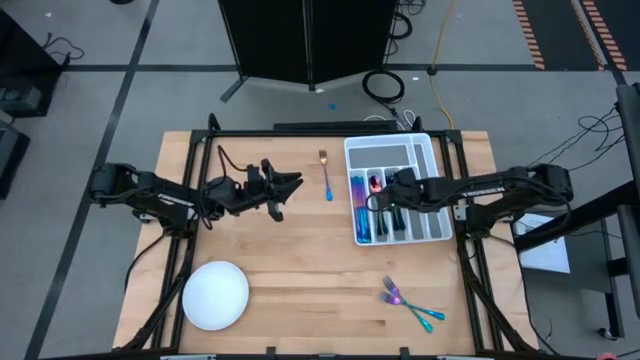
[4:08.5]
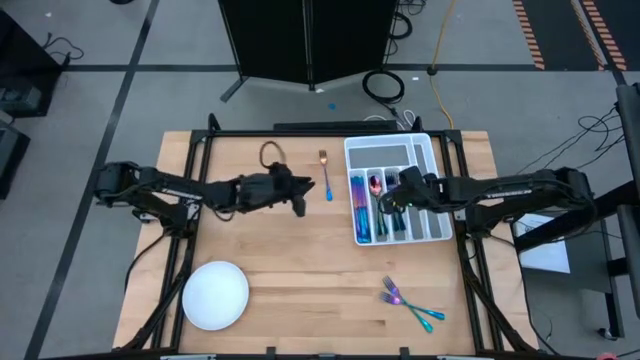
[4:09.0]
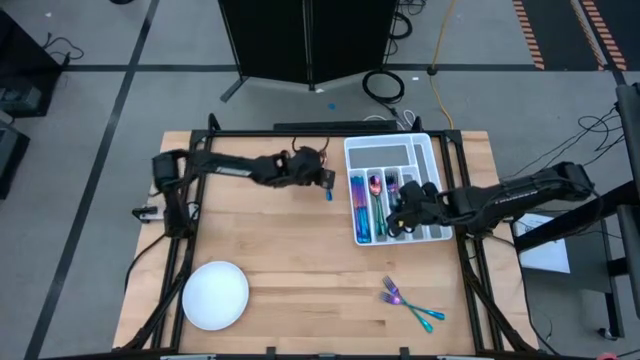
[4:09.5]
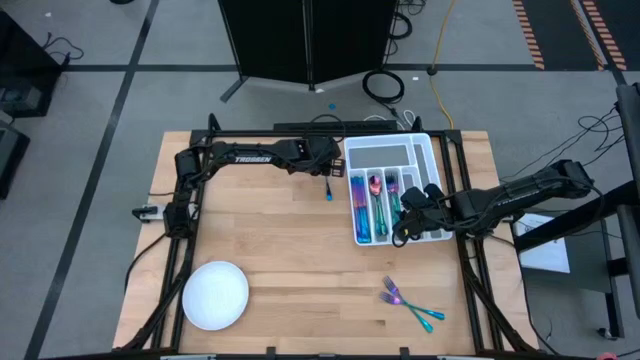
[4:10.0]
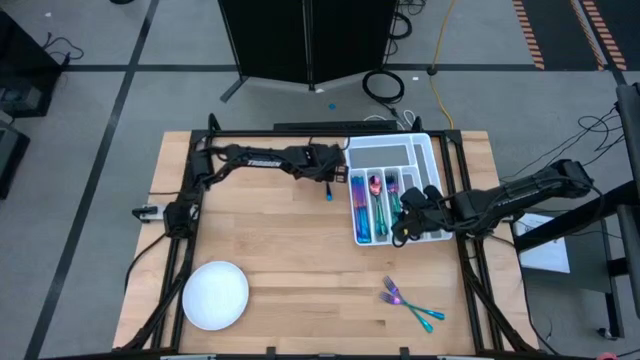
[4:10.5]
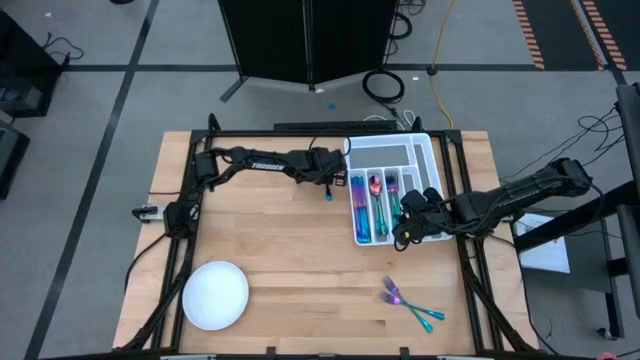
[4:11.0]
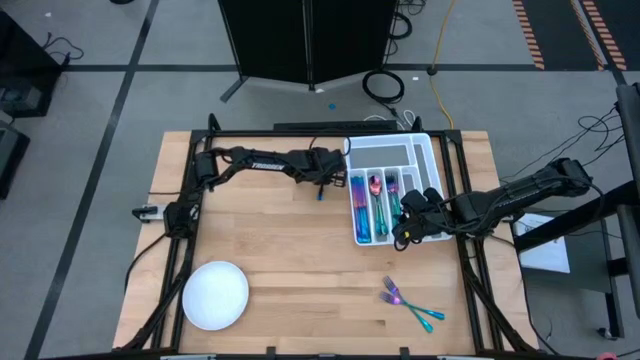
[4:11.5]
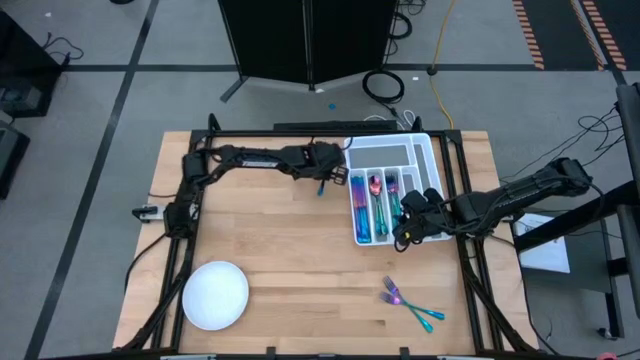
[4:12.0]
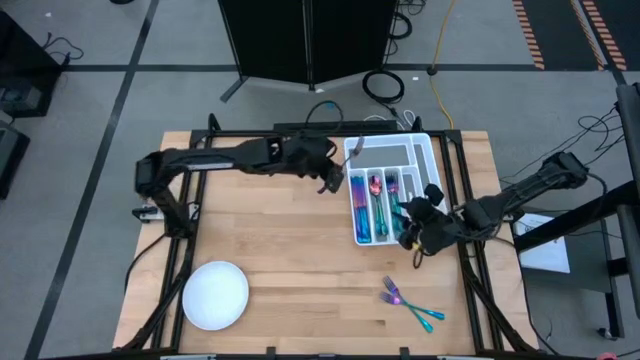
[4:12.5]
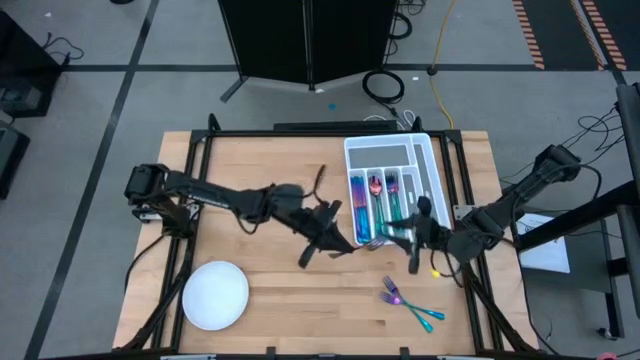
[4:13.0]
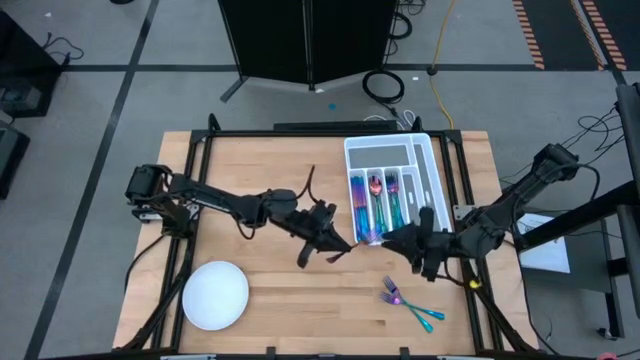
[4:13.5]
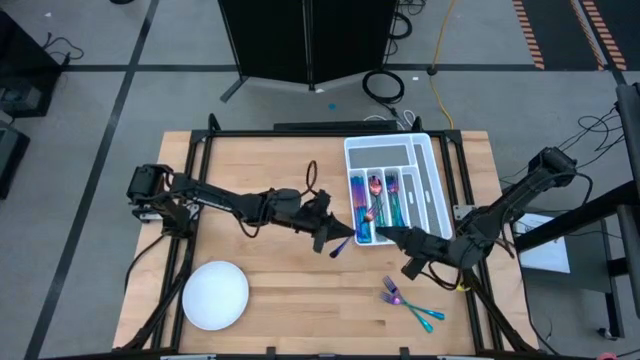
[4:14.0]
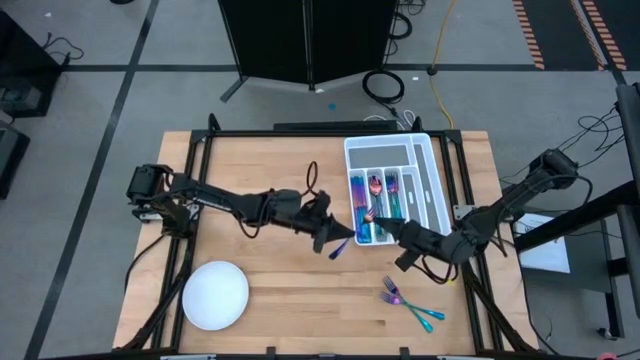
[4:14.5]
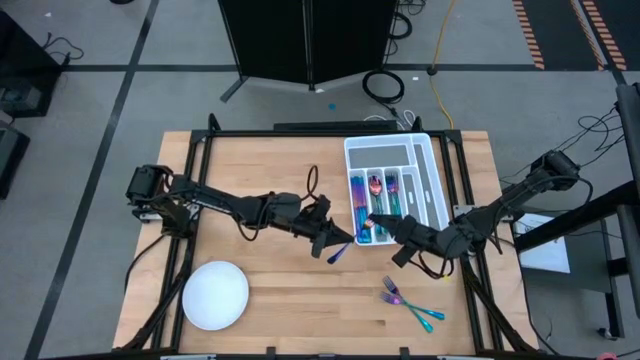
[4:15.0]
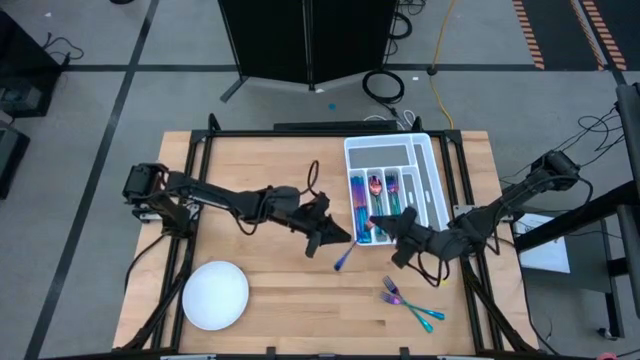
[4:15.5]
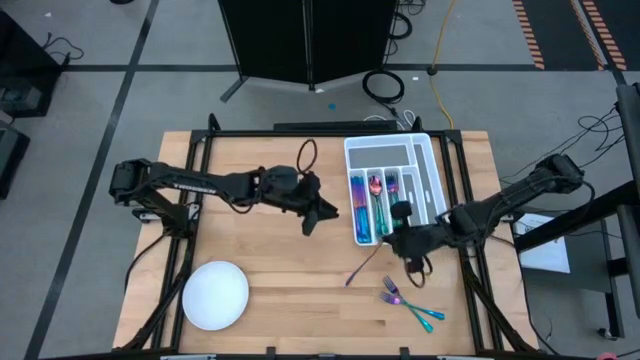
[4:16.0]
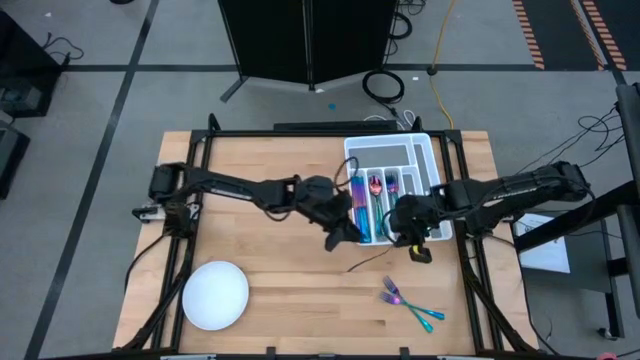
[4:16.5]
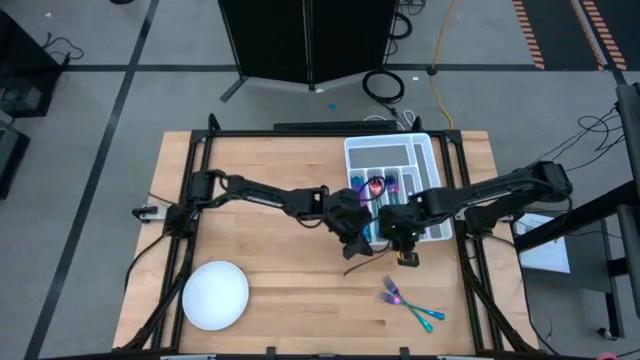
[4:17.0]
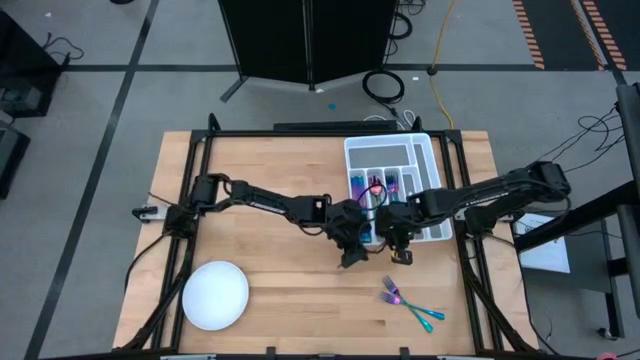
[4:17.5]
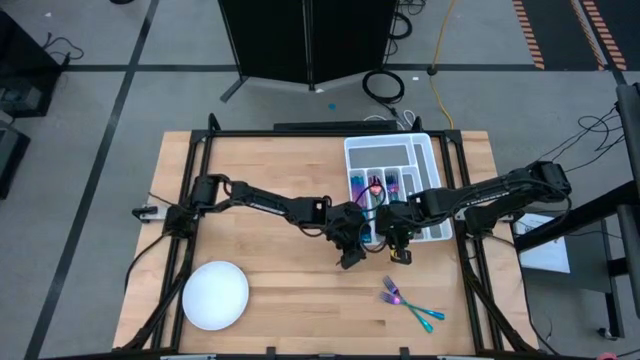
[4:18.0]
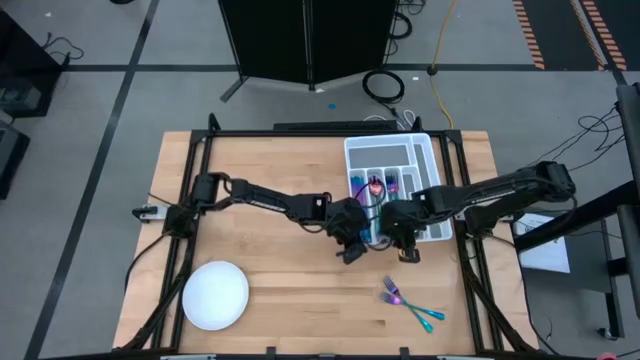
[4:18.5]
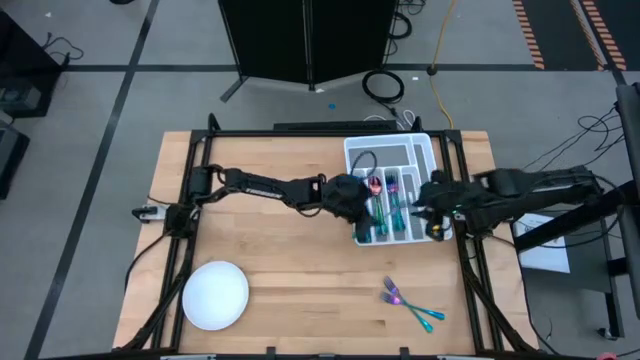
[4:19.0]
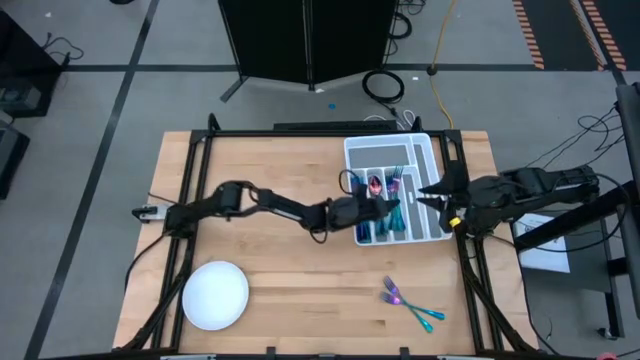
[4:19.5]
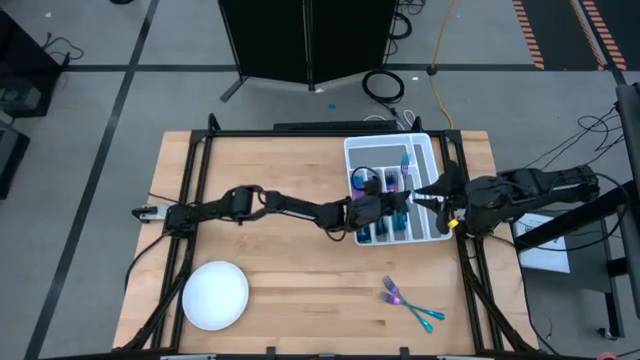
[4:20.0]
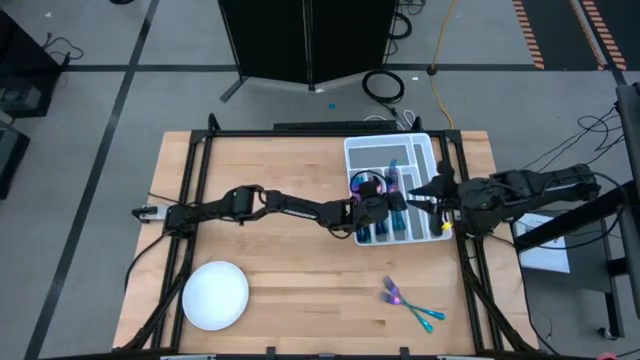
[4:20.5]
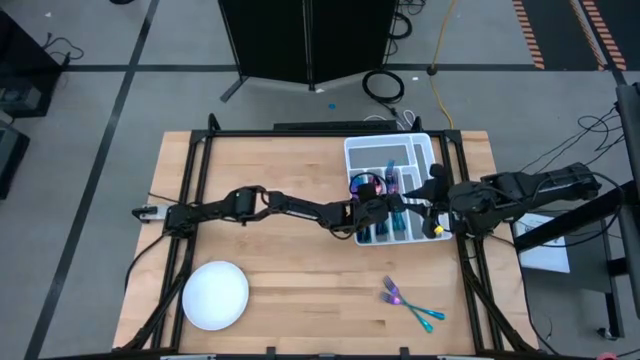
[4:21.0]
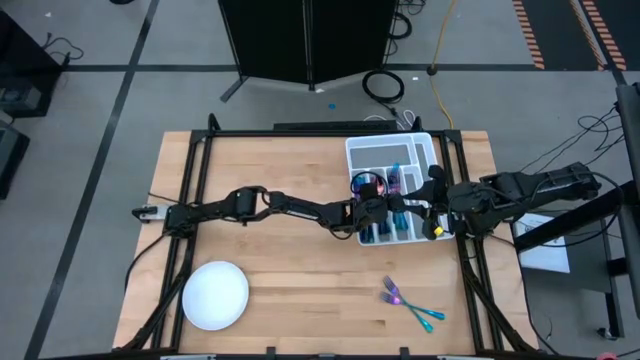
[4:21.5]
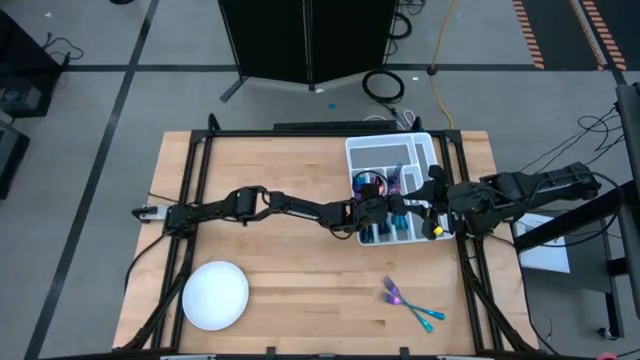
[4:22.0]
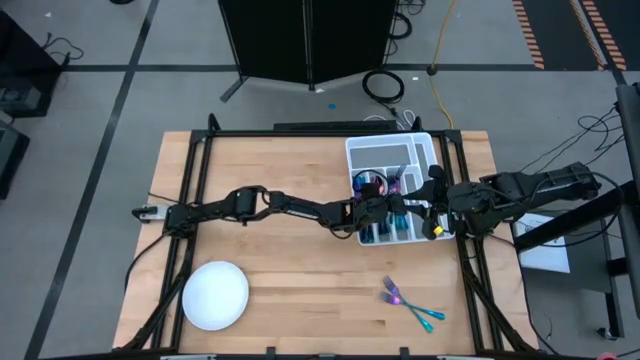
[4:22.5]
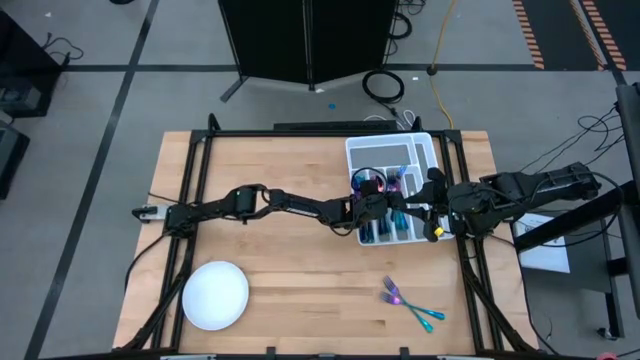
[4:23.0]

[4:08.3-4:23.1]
Task: Sort silverware
Put the blue fork into the utensil organizer

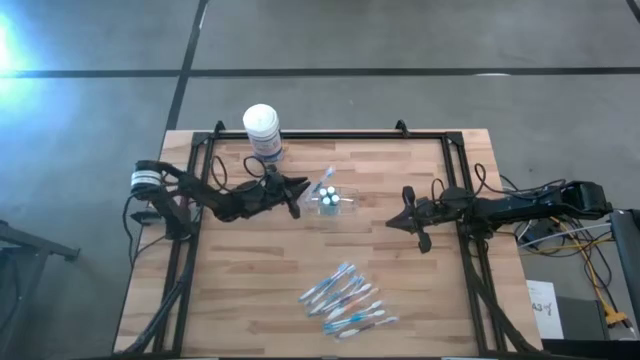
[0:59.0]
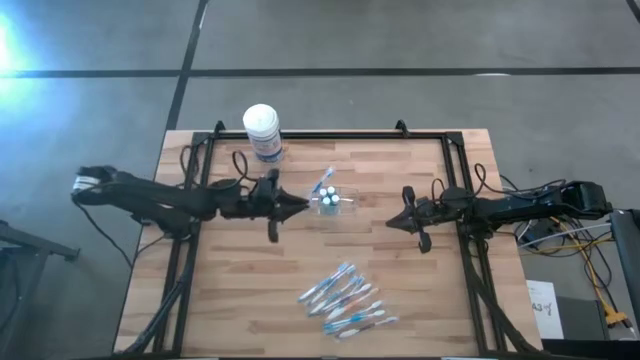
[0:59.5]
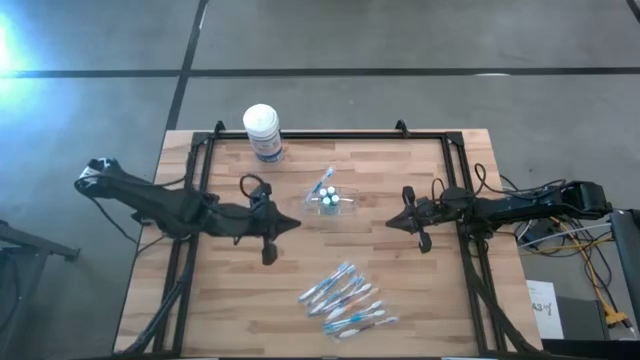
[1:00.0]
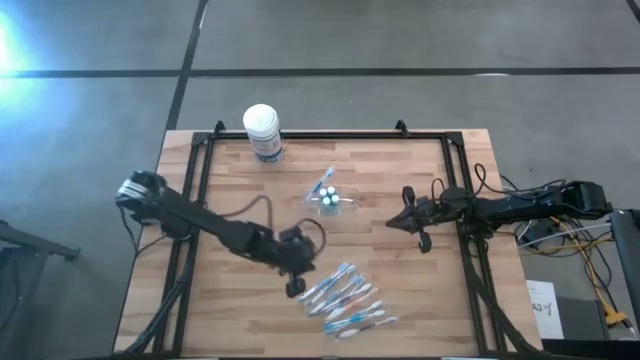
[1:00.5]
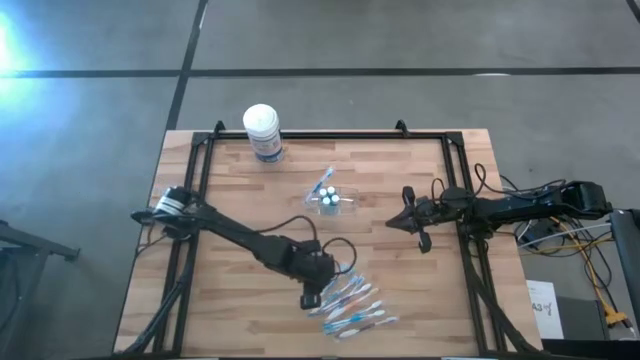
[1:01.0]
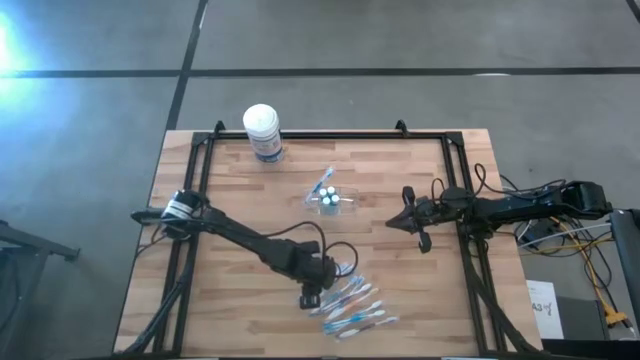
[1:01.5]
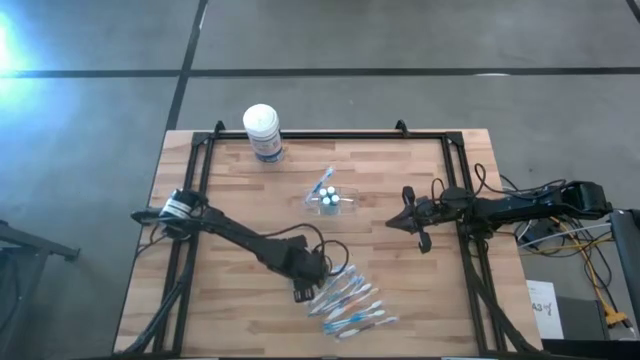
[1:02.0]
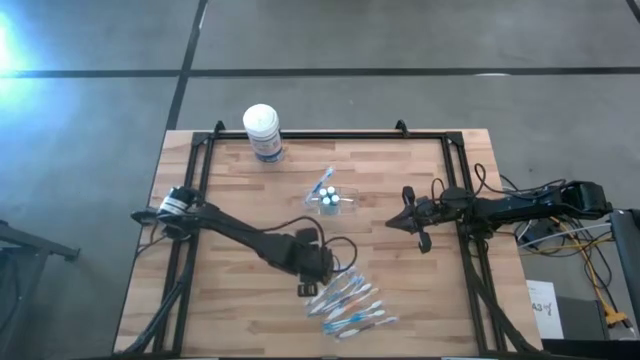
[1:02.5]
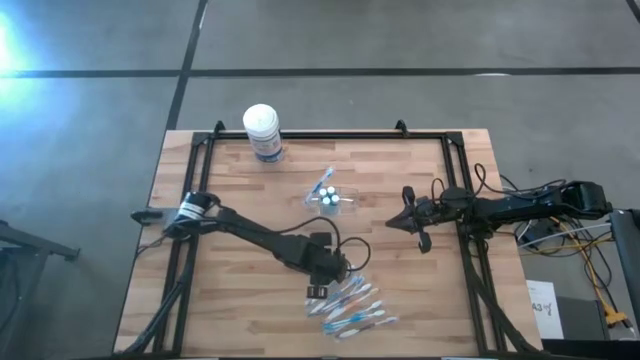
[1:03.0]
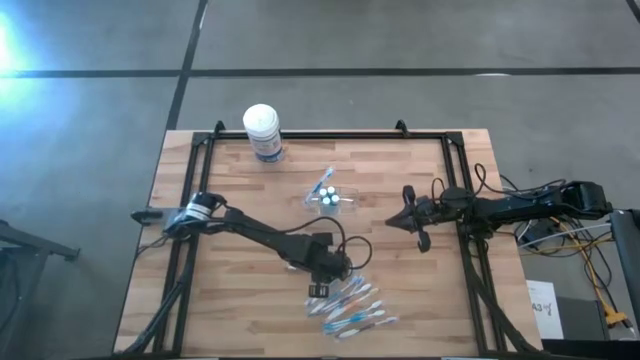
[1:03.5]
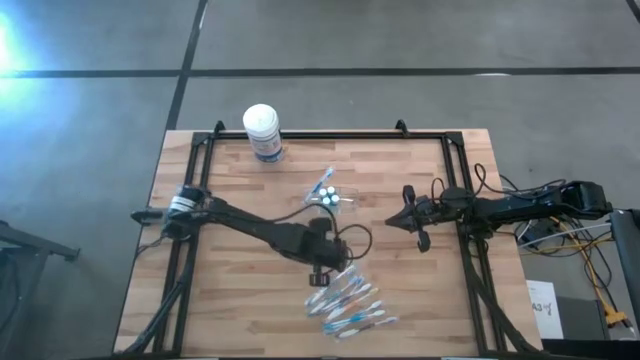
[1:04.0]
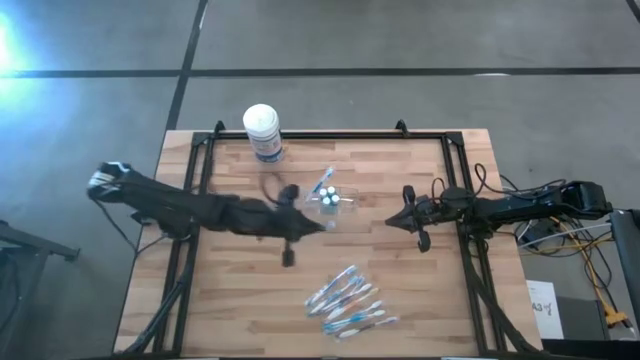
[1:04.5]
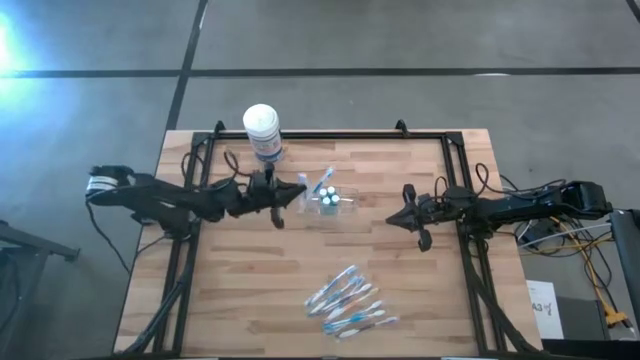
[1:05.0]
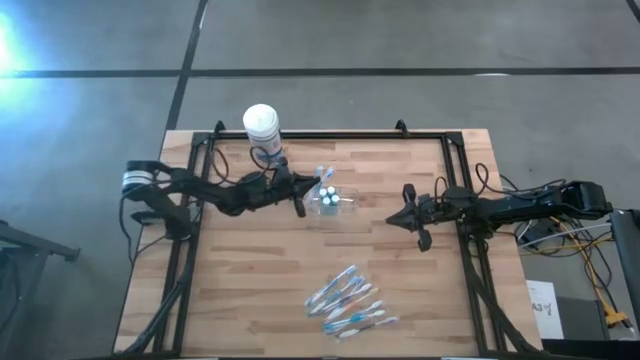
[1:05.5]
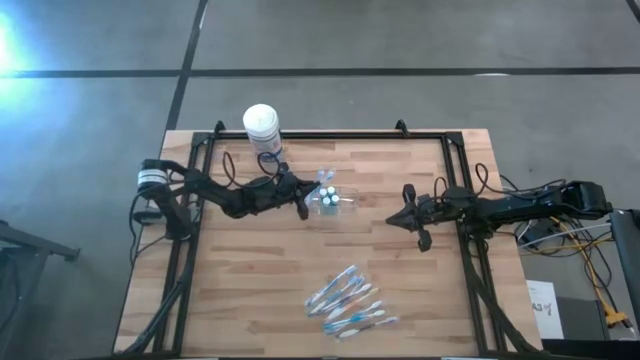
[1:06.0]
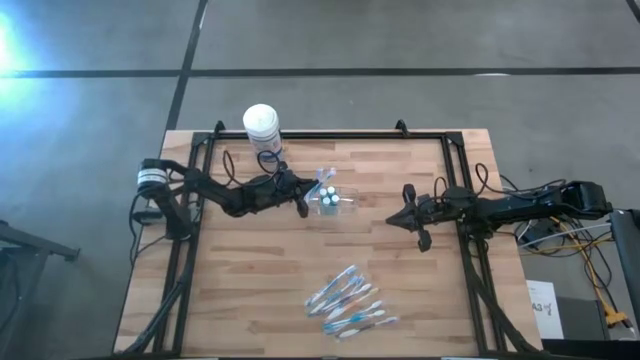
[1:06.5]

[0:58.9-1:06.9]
Task: Pick & Place toothbrushing station
Put the blue toothbrush into the transparent organizer
